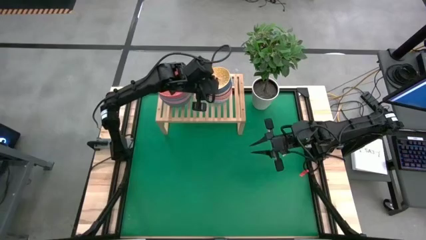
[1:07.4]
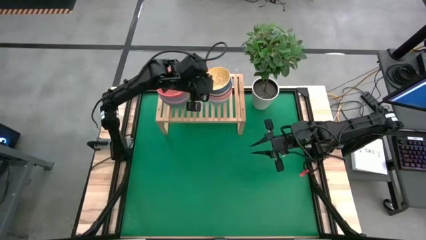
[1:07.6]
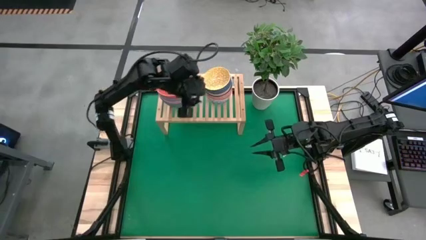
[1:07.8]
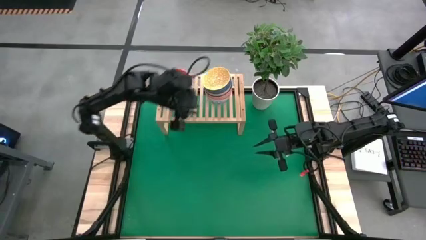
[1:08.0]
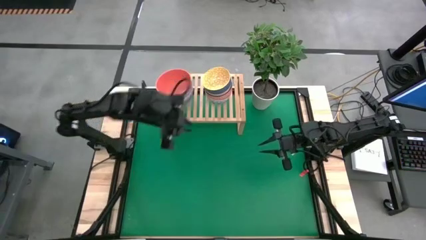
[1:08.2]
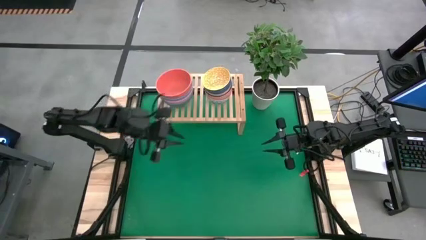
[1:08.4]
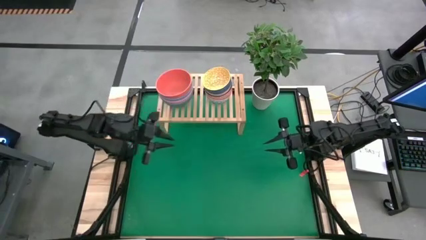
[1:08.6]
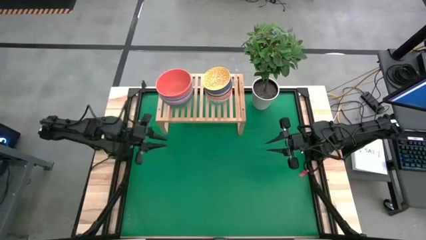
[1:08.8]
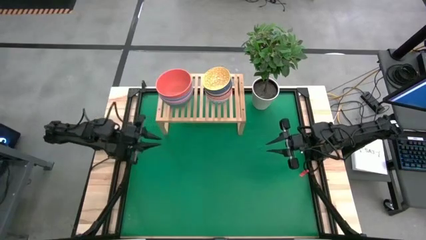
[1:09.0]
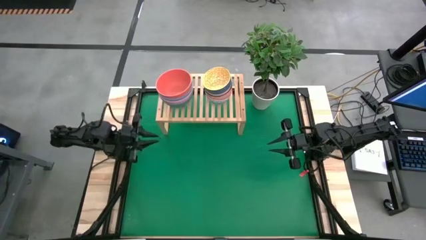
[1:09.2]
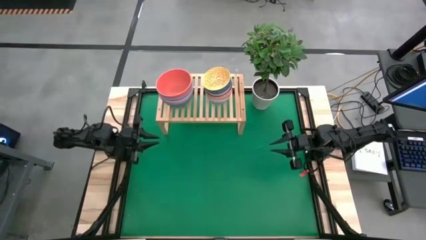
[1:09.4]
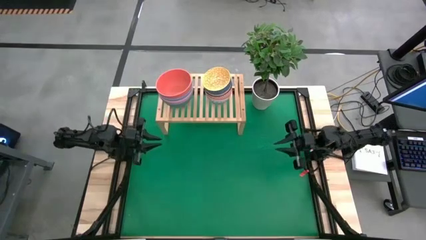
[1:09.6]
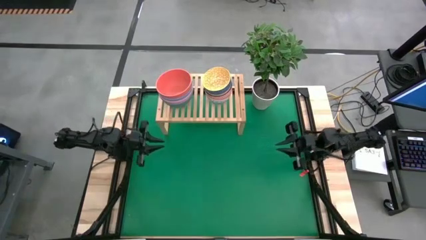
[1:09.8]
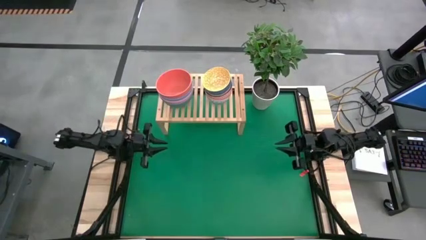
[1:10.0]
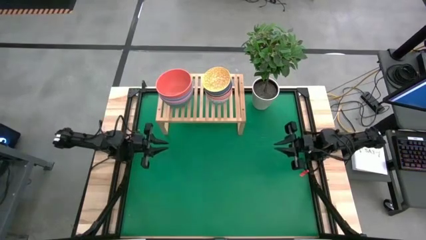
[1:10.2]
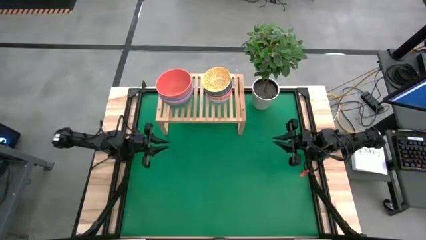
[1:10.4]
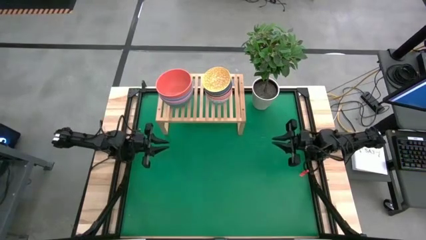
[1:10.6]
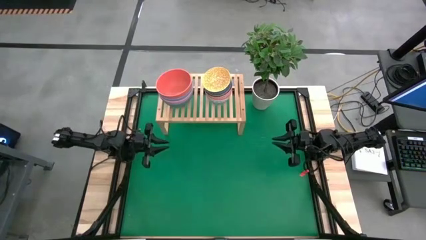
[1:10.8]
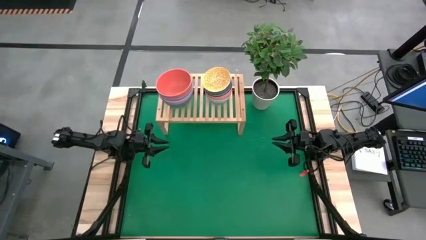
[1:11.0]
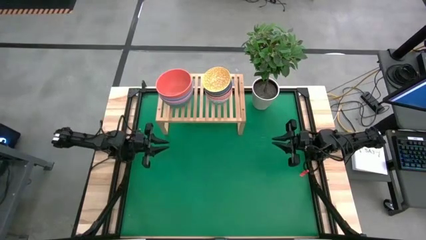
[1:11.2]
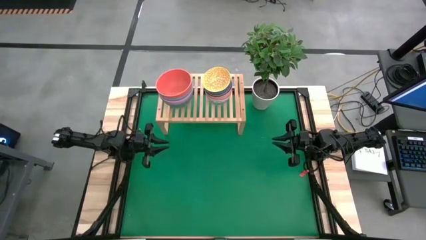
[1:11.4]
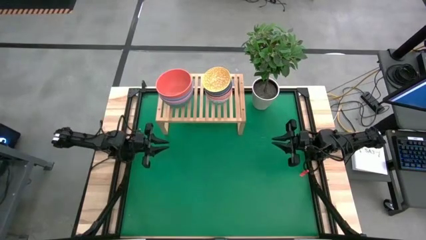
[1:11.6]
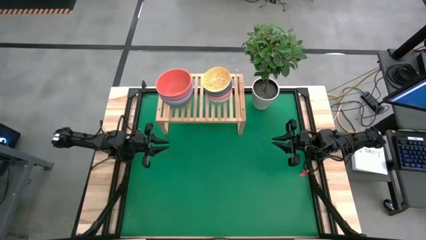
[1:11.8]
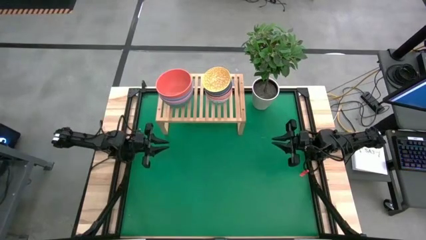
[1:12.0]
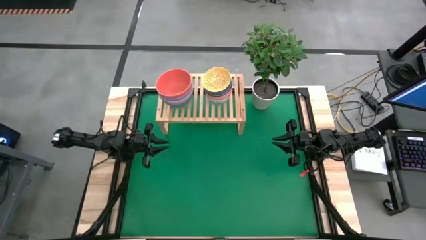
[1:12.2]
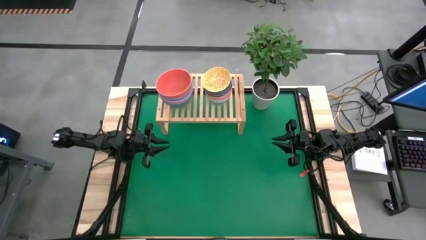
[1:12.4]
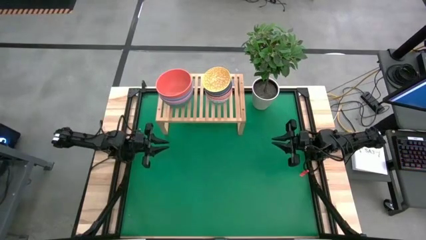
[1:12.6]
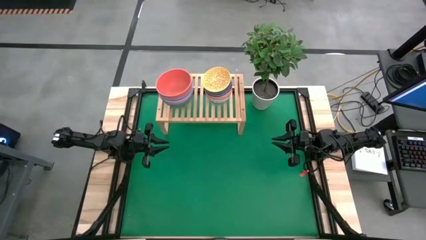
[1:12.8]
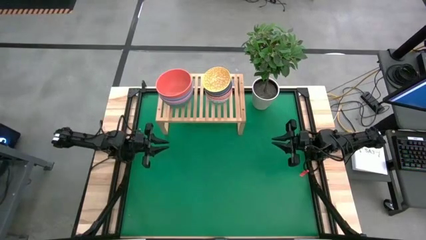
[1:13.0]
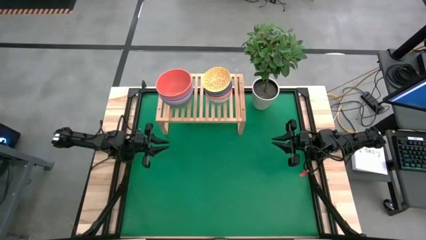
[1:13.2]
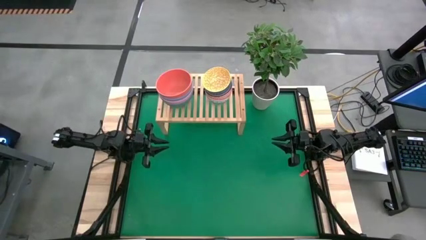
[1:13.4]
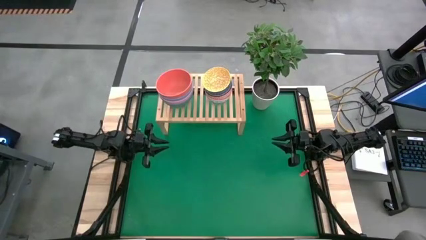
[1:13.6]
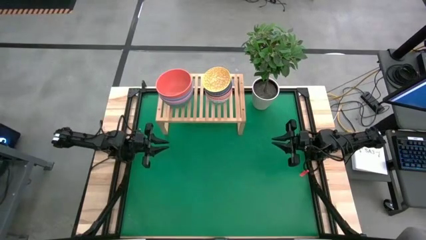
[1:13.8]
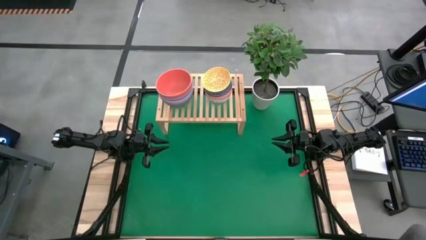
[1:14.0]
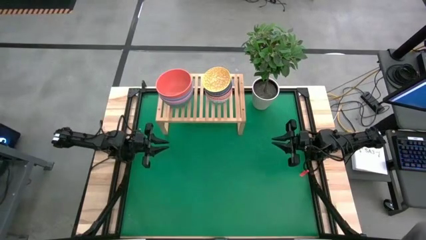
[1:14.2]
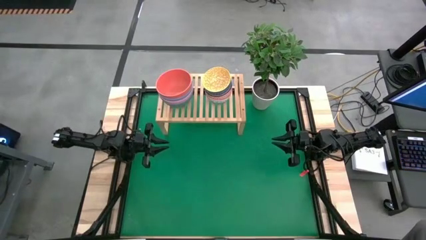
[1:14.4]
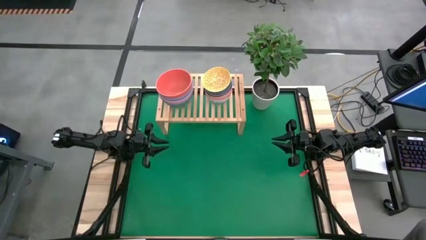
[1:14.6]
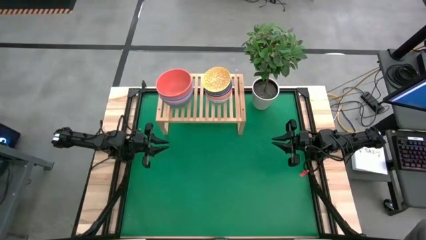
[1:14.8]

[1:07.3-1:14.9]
Task: Place and stack bowls onto a shelf
Return to Home Position

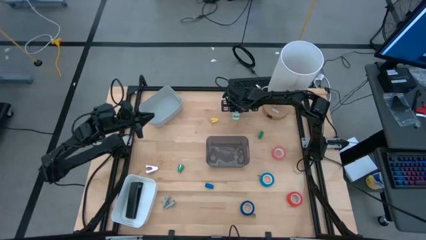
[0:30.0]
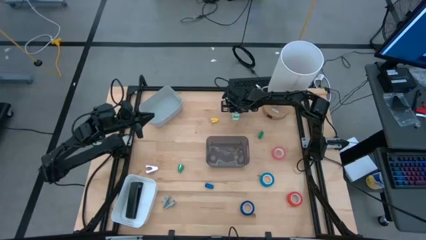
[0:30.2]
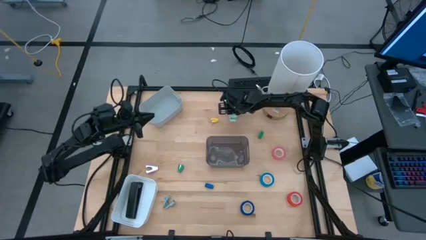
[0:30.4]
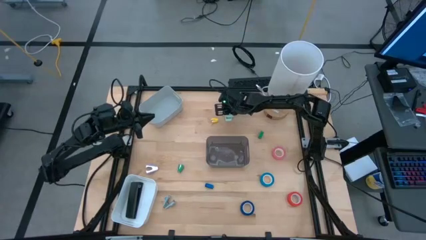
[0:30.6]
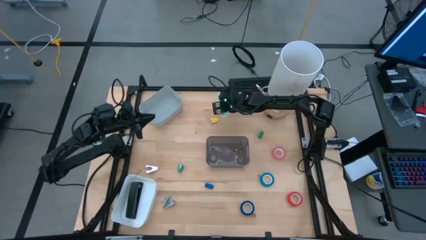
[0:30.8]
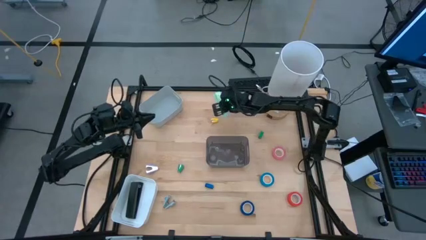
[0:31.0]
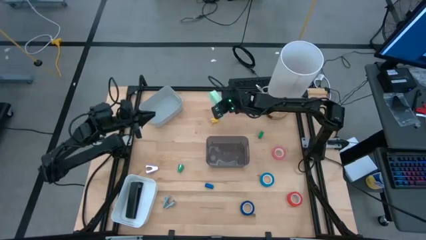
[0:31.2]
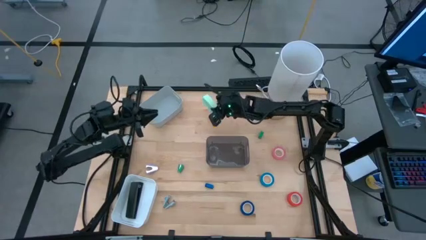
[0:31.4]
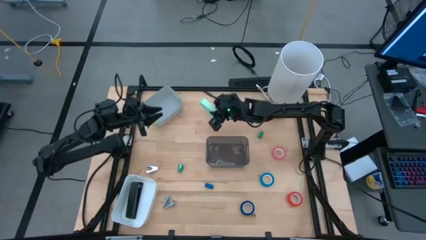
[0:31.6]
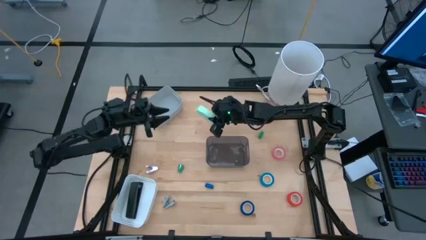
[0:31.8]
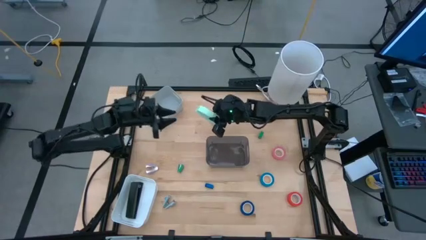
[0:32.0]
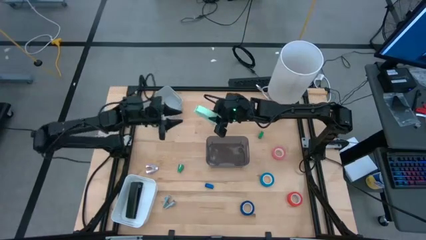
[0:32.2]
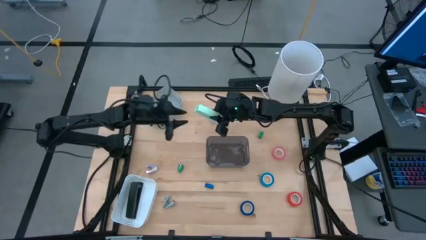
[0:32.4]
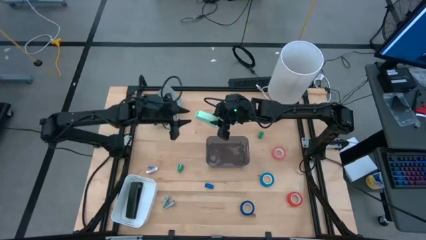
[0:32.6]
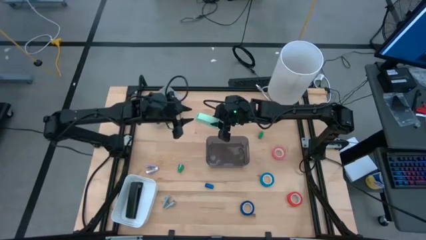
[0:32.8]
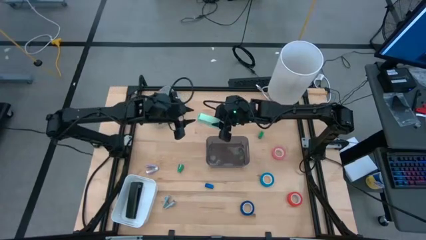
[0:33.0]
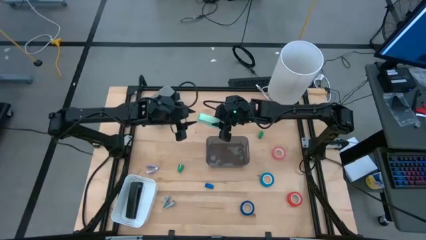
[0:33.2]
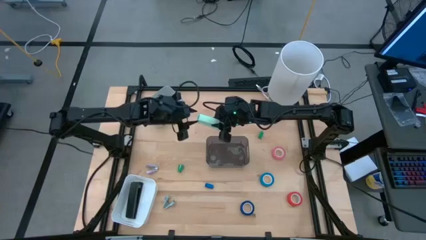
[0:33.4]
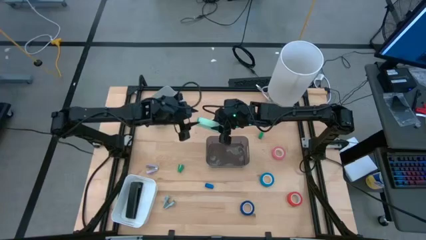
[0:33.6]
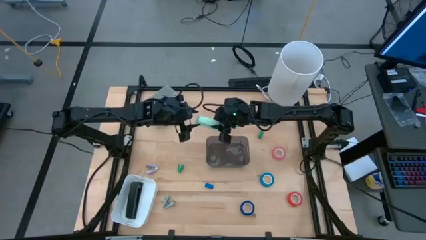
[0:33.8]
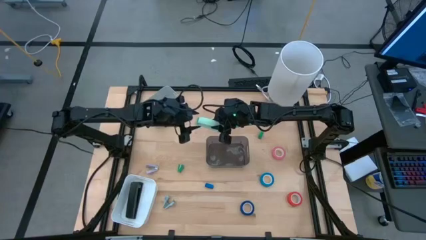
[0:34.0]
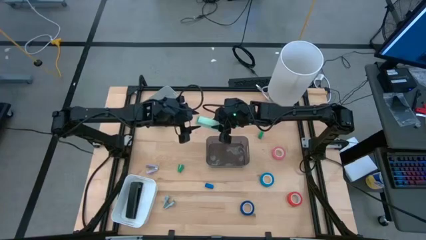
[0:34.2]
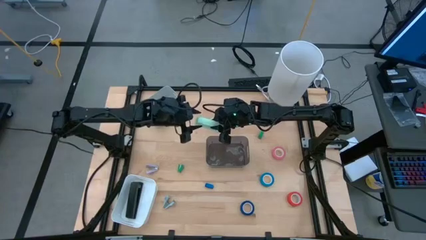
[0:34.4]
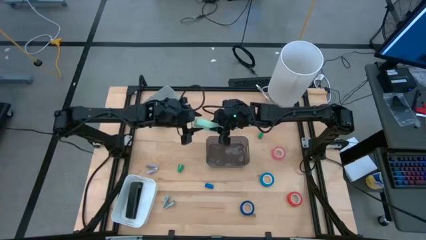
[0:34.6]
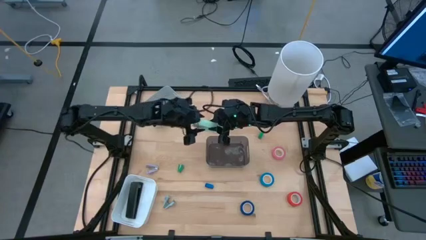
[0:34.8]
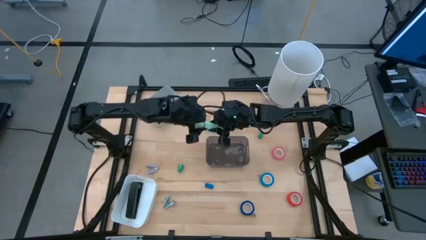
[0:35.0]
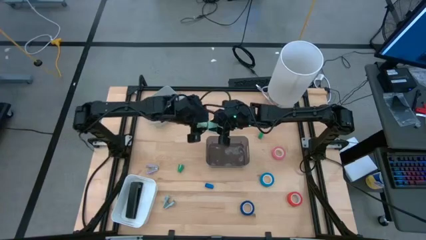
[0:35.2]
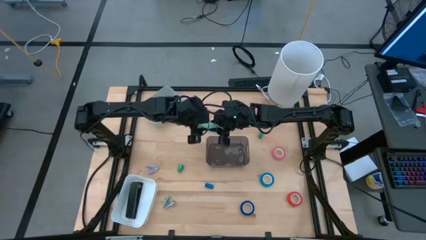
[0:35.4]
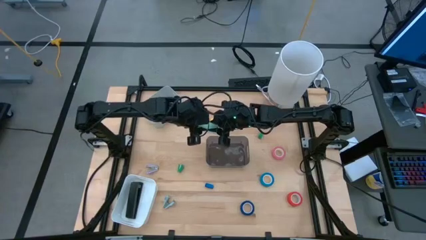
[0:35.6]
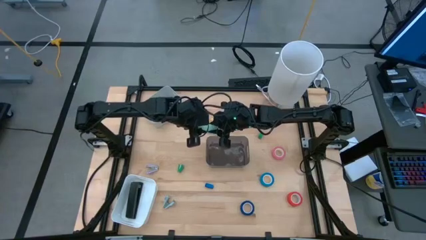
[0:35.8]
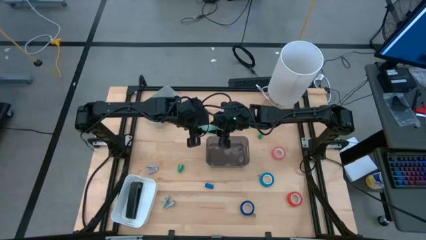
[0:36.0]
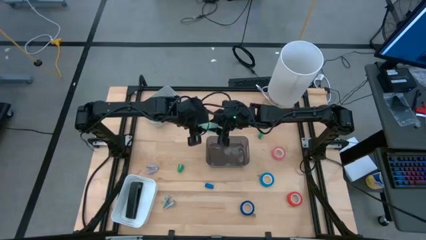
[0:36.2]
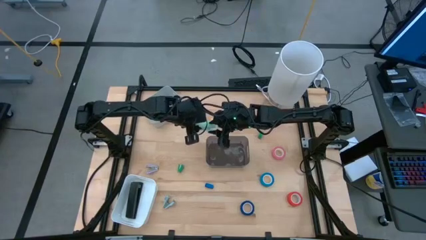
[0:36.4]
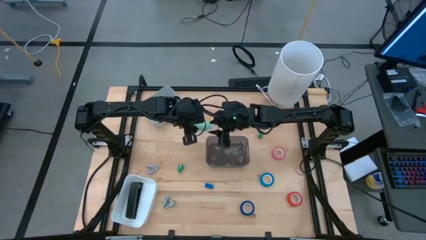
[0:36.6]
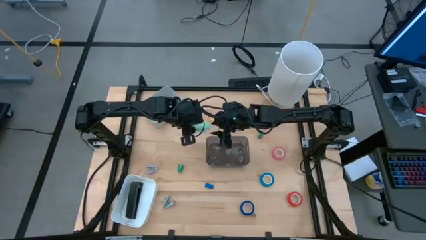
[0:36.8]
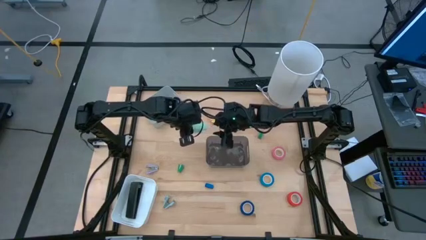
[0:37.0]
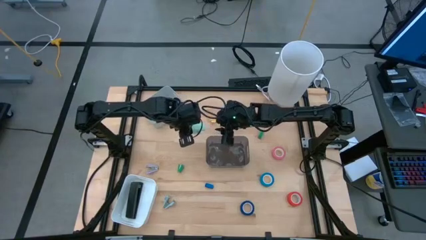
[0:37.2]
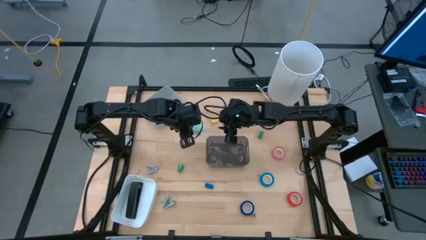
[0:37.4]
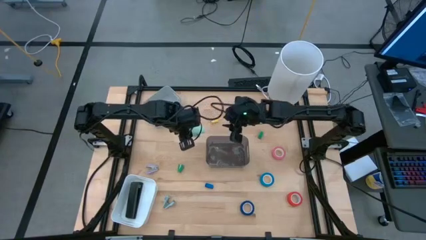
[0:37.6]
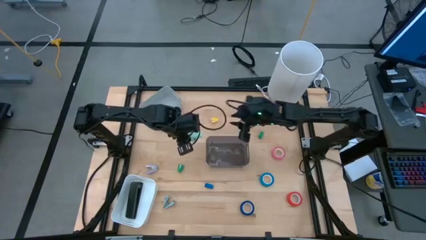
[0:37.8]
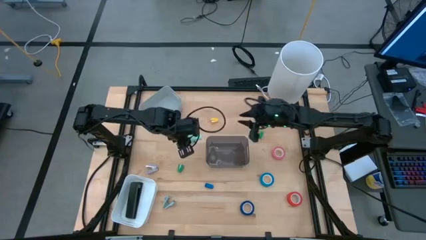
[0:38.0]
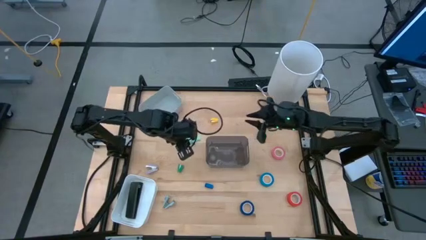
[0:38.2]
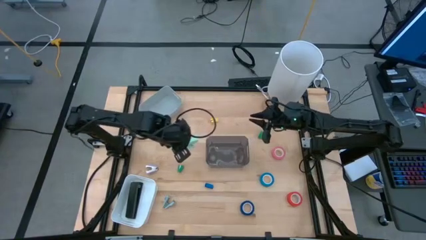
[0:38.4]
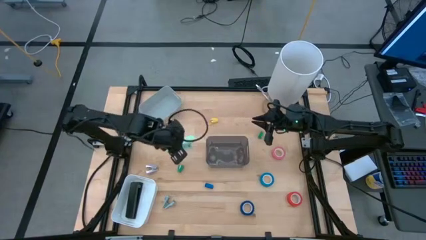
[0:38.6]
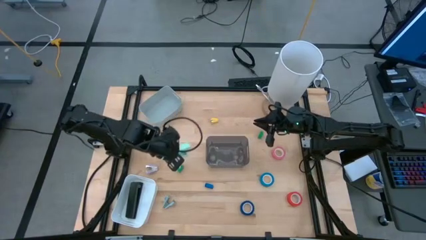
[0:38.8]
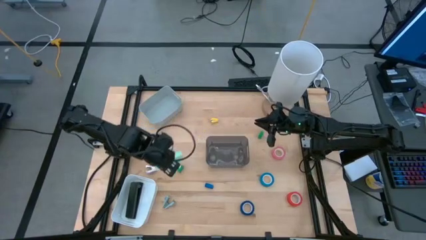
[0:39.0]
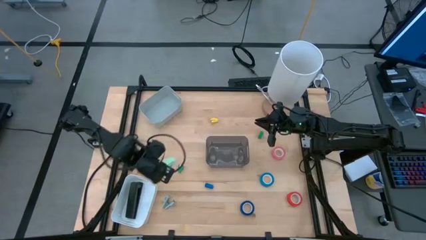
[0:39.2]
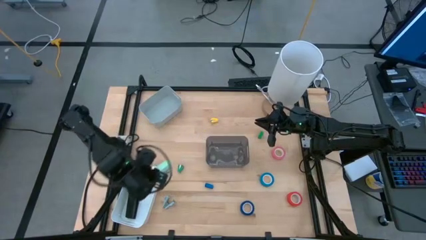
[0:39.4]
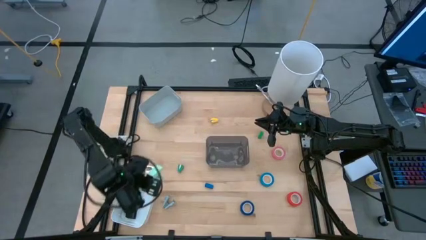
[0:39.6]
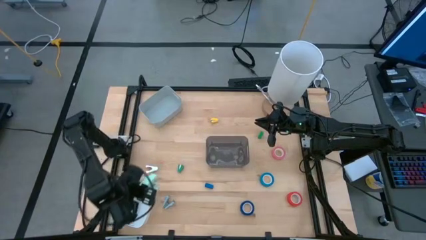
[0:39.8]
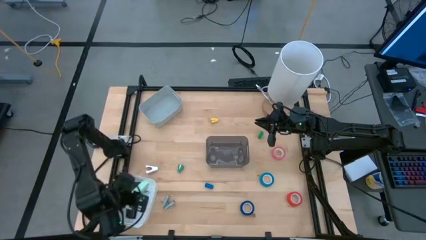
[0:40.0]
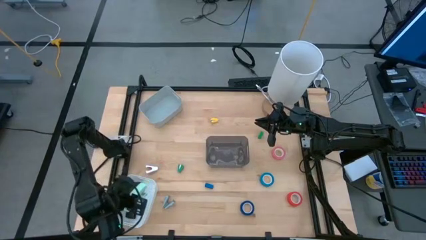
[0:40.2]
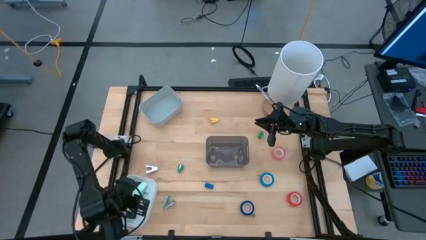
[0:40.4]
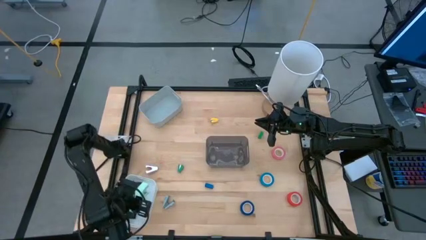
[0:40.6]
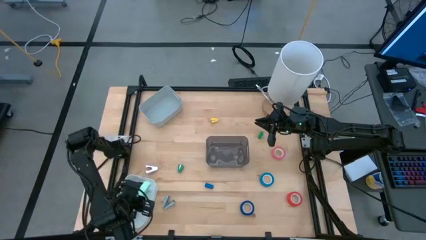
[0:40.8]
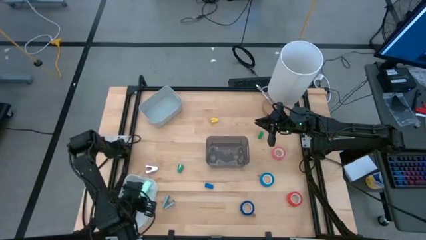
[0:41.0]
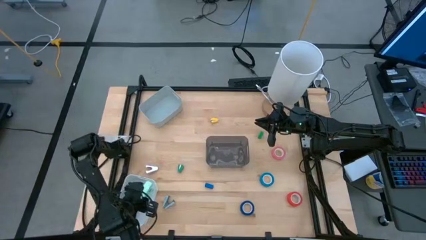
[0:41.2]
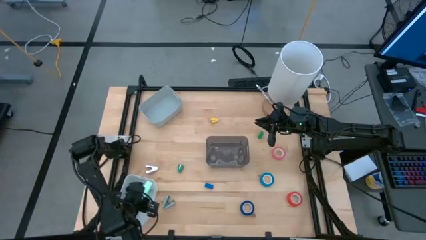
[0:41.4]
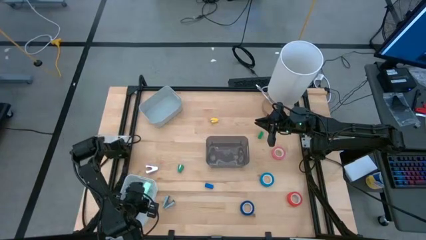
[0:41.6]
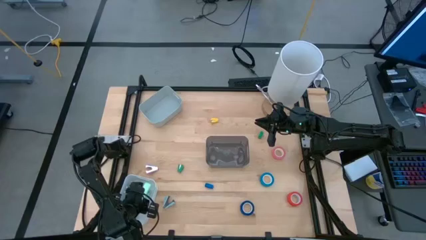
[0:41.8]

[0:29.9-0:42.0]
Task: Pick and place Stapler, Stapler remover, tape
Put the large light green stapler into the white bin
